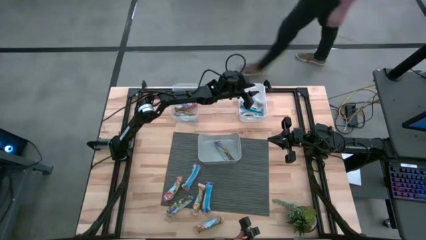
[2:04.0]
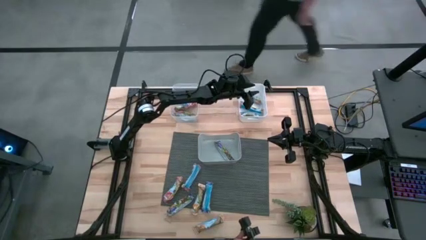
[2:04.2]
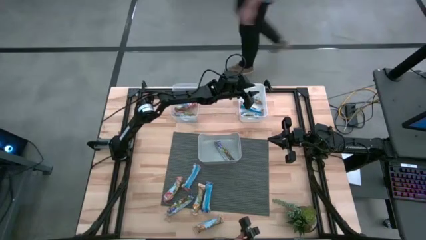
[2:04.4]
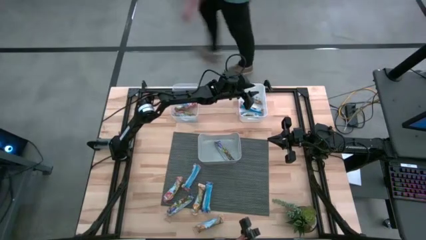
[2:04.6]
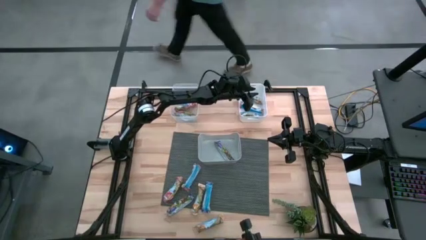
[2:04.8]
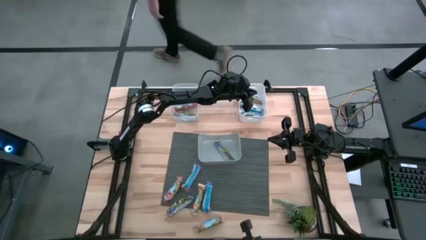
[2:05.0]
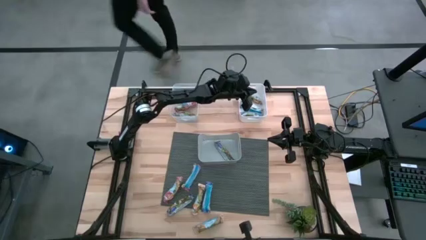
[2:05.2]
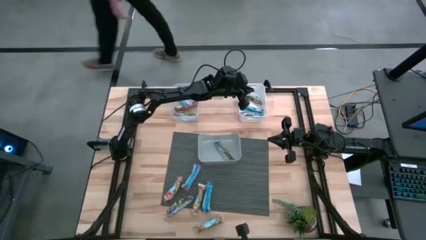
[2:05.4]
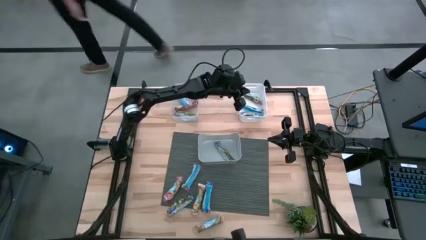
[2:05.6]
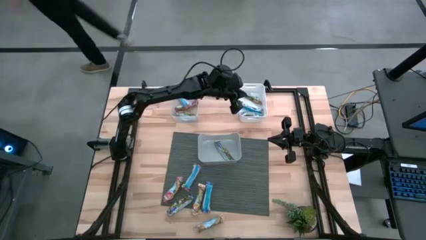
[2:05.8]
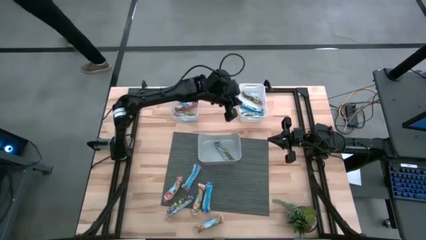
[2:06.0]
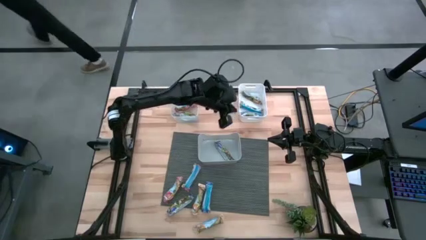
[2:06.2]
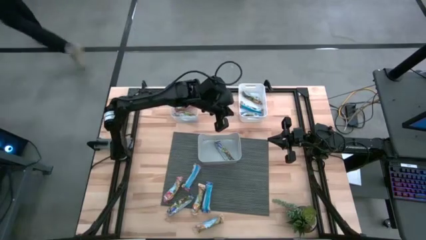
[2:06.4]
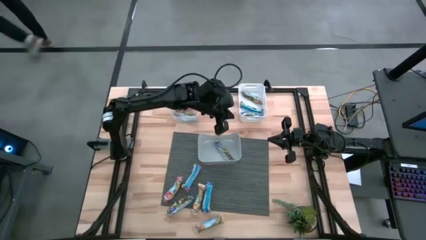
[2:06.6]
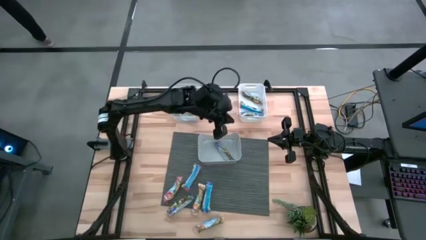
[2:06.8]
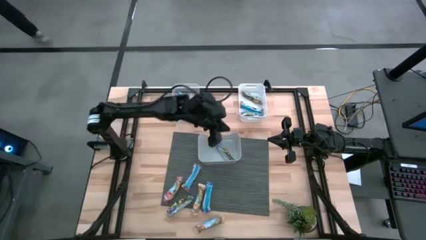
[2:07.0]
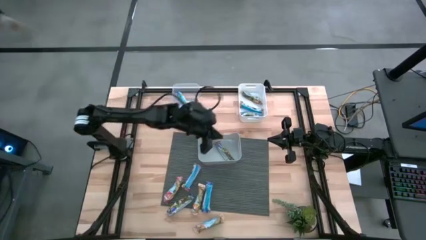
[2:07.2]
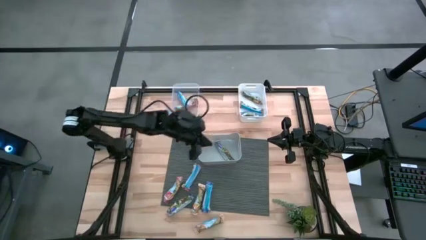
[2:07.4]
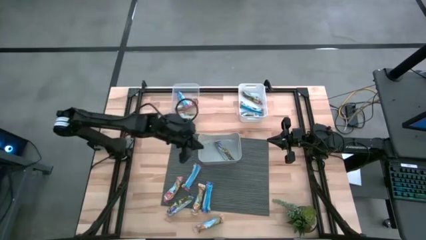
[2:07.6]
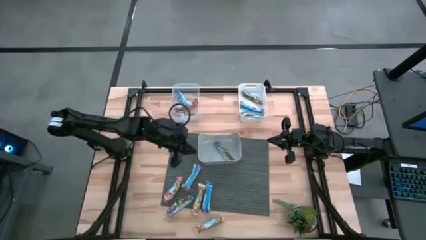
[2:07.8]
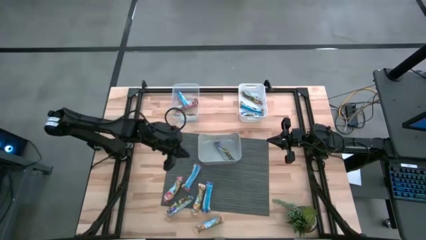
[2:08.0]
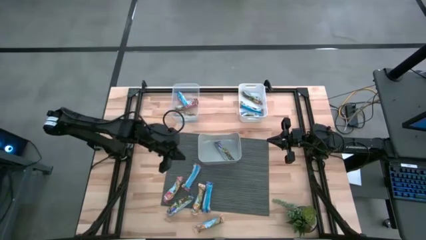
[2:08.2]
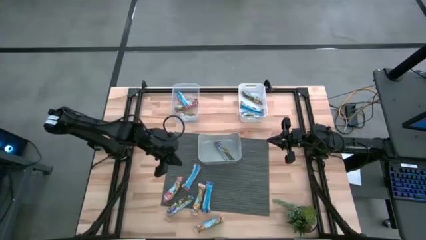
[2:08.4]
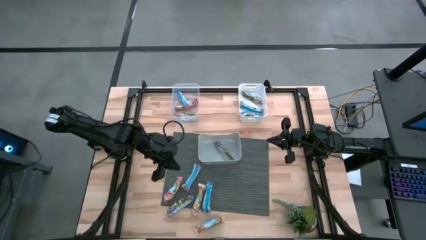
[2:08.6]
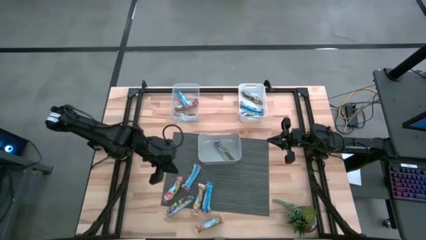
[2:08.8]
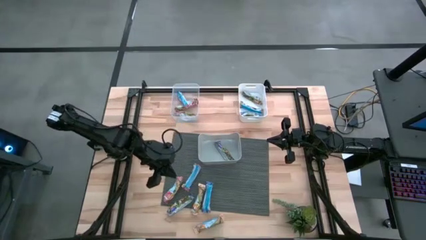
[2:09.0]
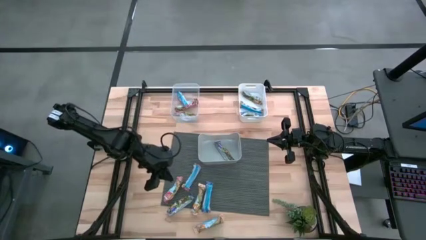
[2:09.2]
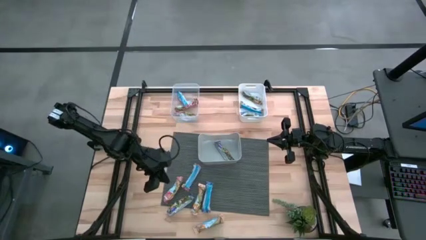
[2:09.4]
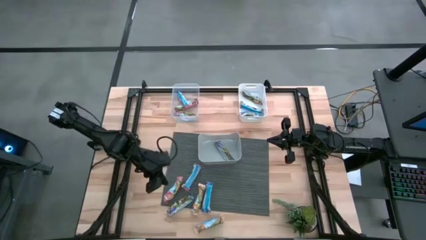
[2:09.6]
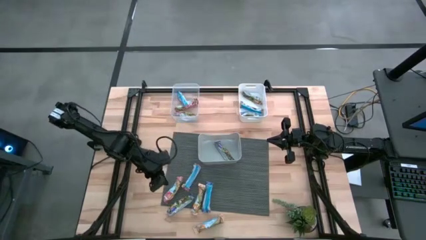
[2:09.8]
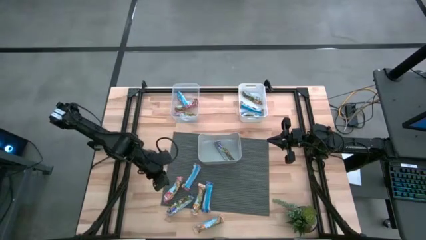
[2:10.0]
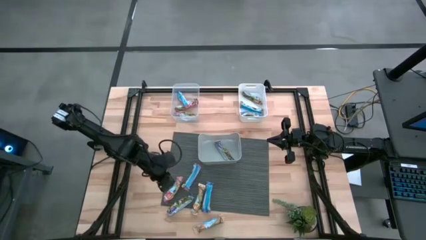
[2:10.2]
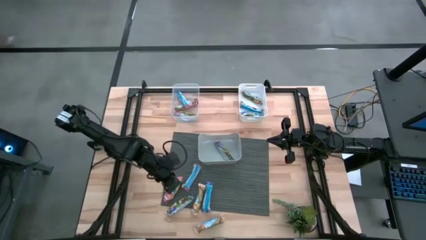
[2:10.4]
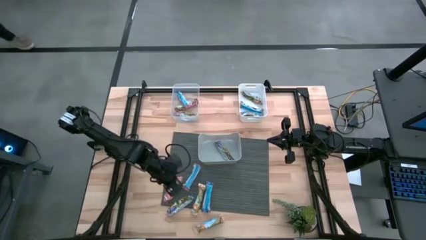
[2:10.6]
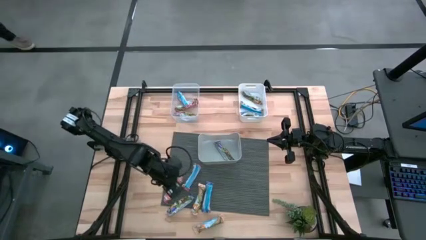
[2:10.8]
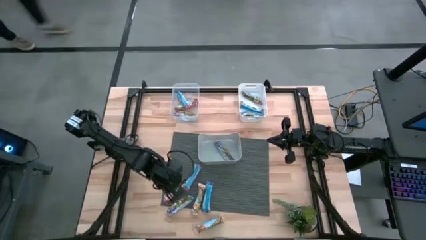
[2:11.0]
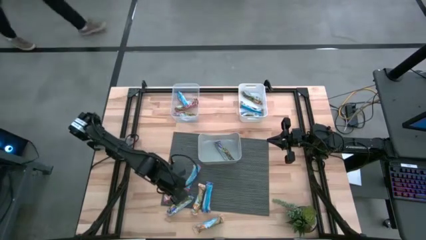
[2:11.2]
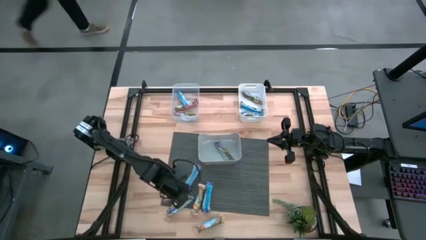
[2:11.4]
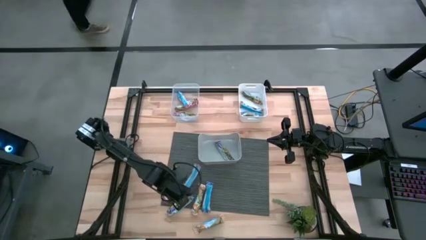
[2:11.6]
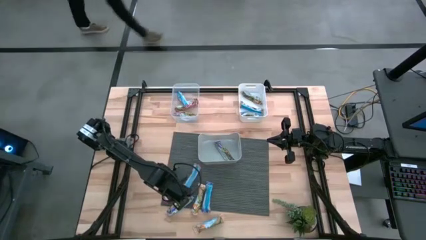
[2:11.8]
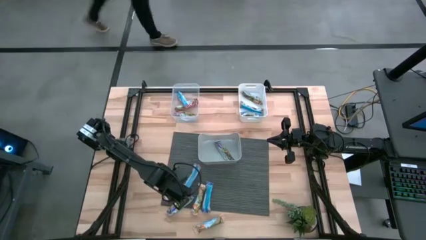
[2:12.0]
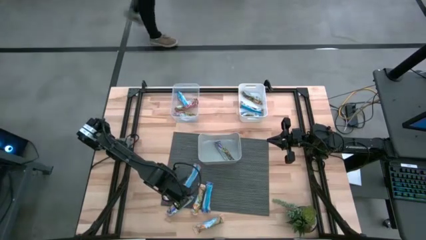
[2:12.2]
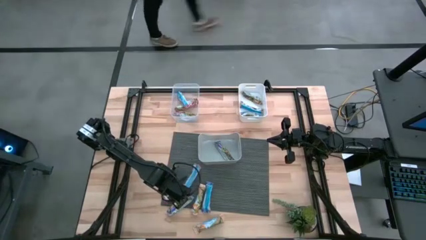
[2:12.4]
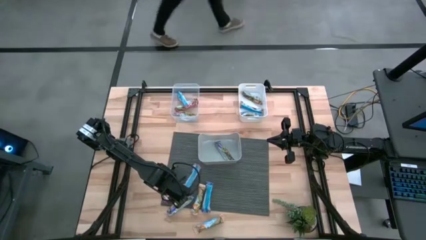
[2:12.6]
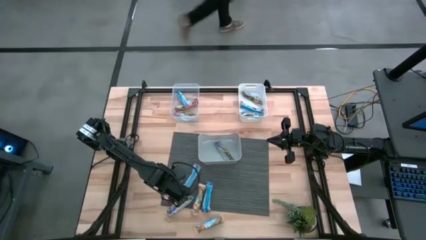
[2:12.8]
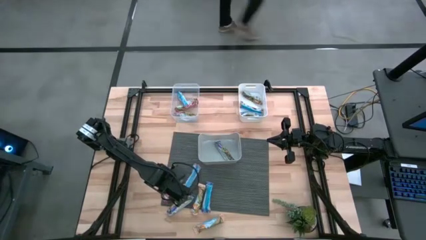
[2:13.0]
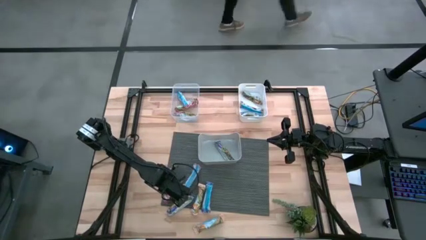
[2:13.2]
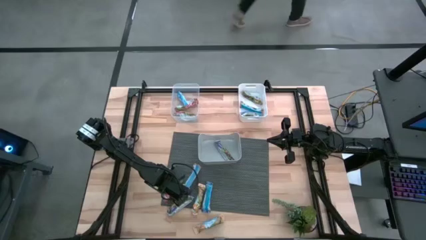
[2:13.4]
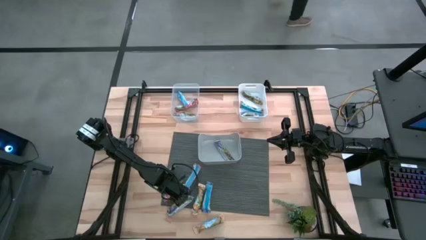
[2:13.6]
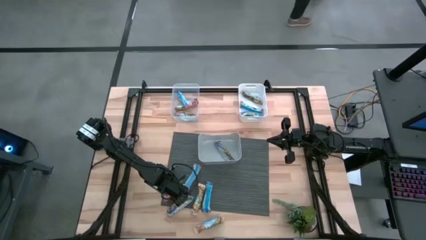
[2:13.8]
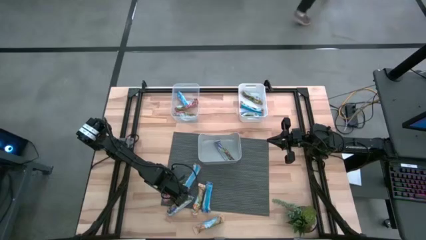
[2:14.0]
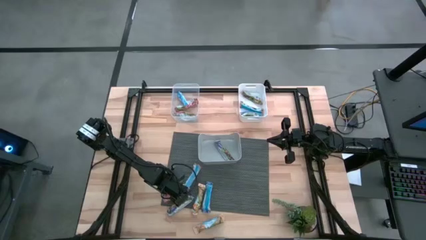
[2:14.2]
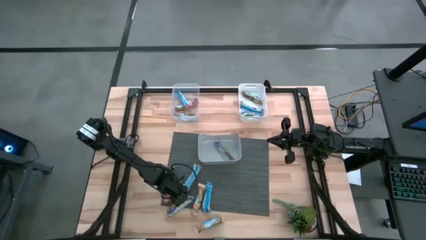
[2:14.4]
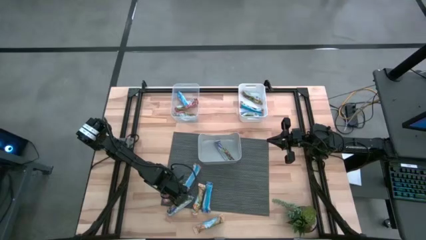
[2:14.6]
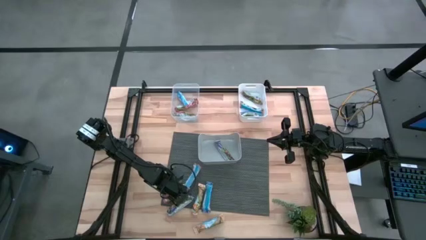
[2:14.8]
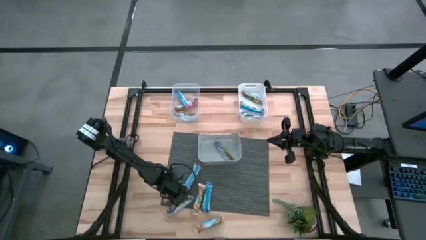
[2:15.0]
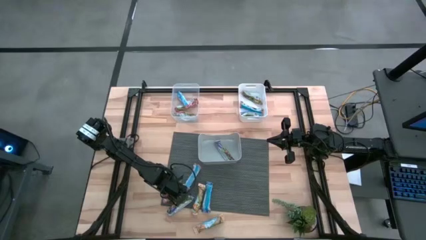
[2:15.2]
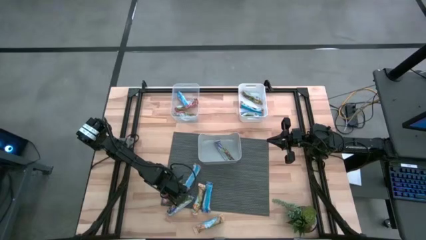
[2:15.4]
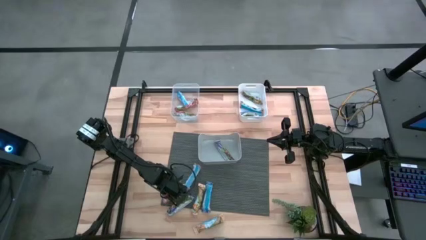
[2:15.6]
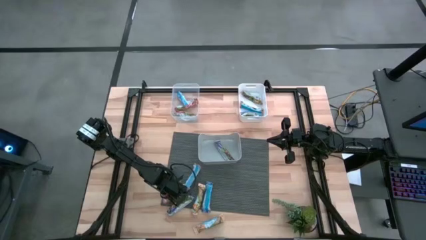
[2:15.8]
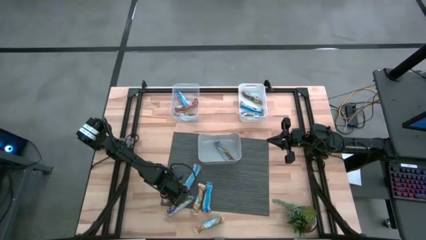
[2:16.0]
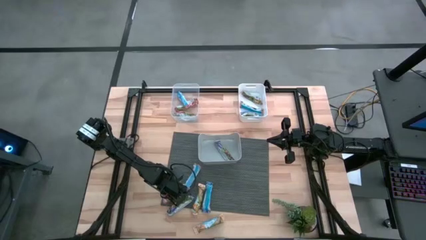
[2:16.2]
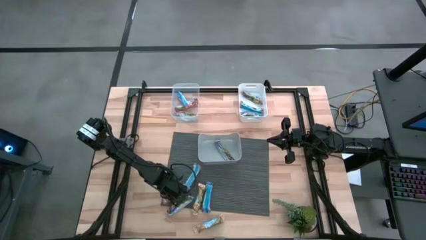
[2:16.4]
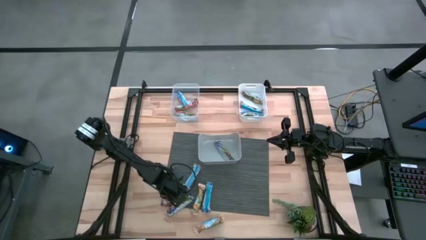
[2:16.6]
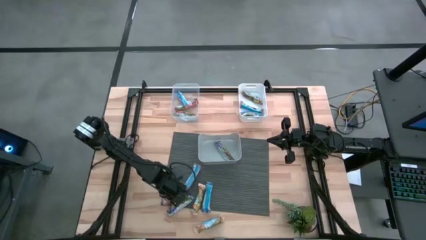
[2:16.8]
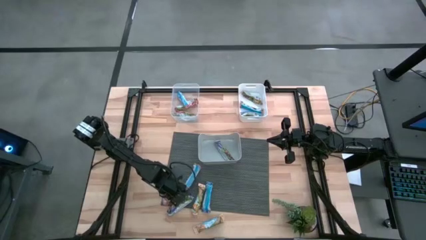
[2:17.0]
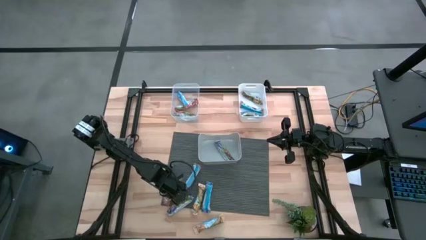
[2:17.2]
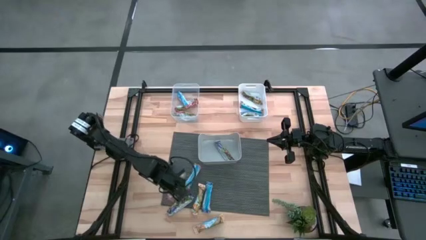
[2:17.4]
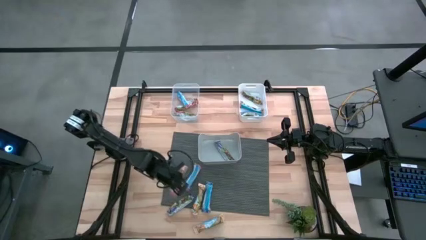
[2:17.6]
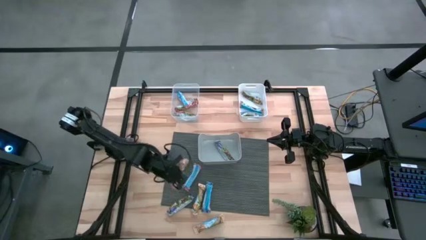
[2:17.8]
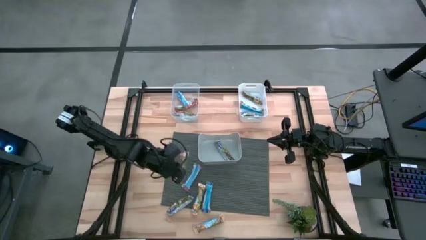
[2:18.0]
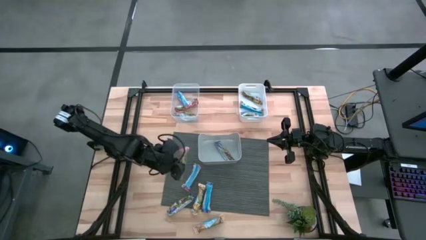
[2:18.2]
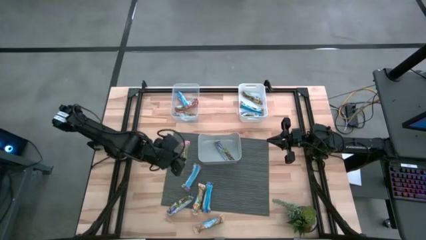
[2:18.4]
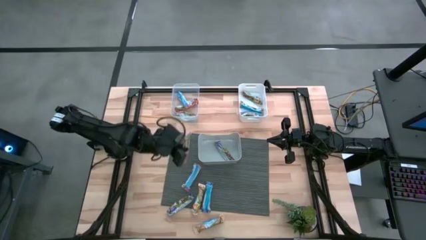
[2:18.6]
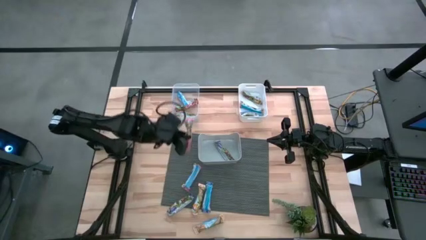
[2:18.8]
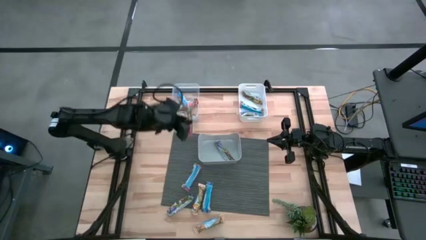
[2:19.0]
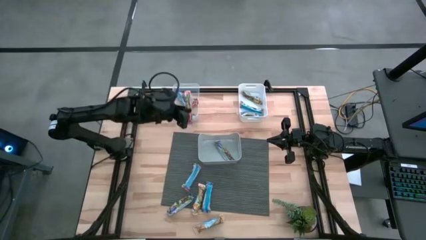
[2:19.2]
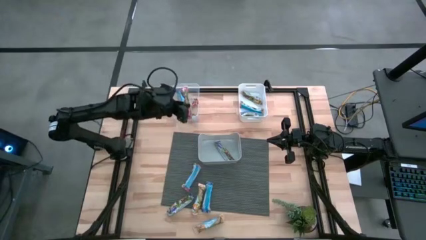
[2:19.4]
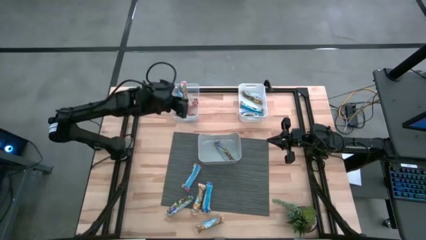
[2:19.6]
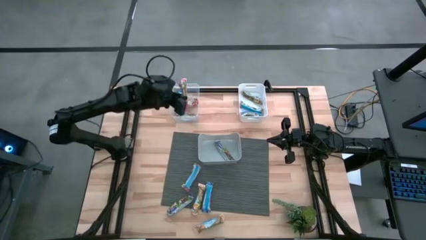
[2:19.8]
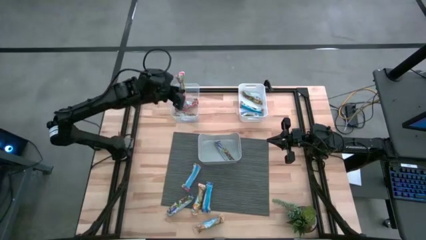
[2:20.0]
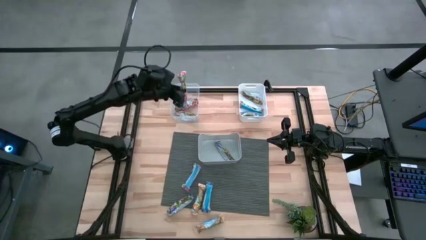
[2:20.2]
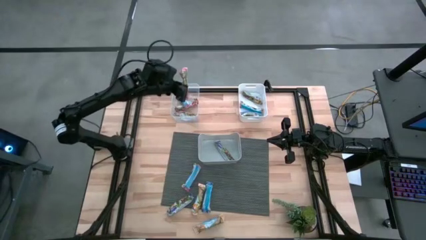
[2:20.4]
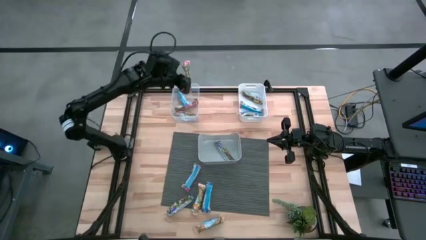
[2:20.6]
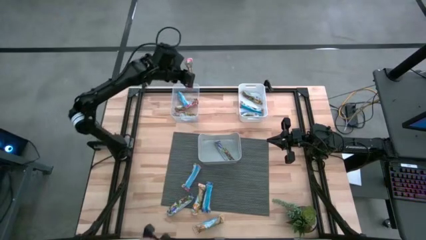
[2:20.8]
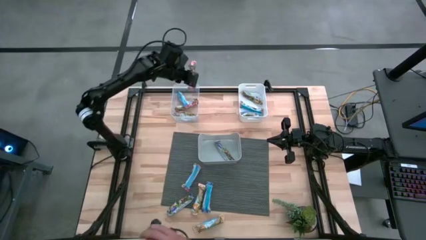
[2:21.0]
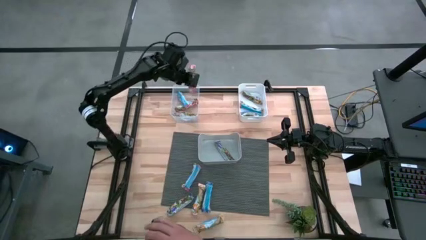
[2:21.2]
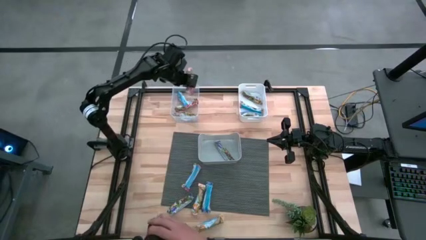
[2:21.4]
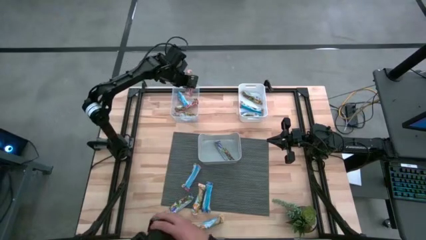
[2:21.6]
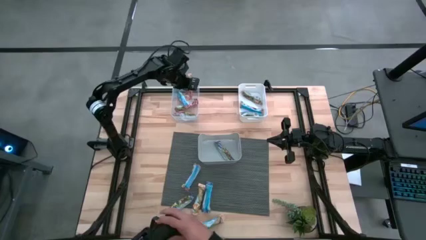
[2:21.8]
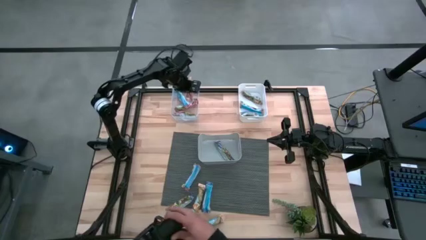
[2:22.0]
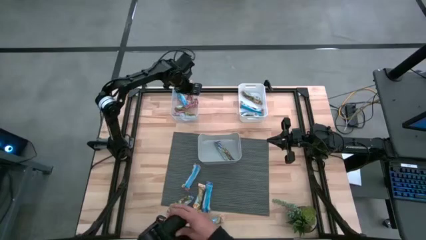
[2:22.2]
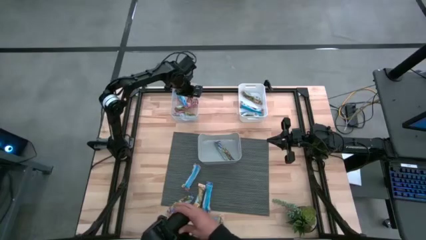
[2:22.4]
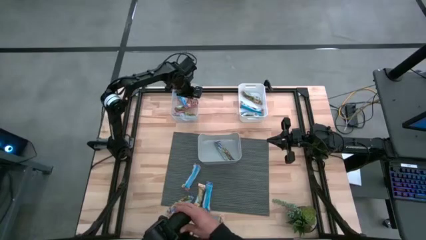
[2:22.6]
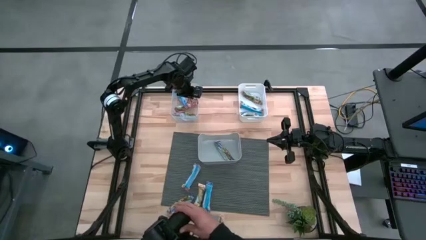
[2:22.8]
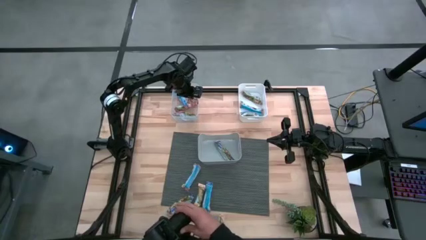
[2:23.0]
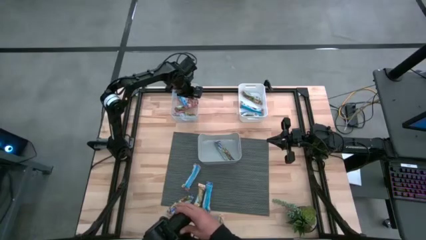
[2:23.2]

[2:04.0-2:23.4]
Task: Pick and place Granola Bars by type
Put the red granola bar into the transparent bin
